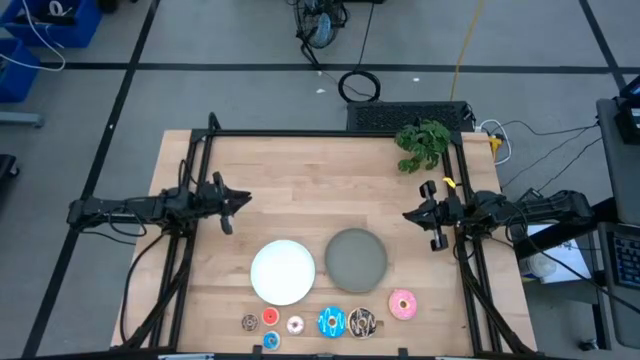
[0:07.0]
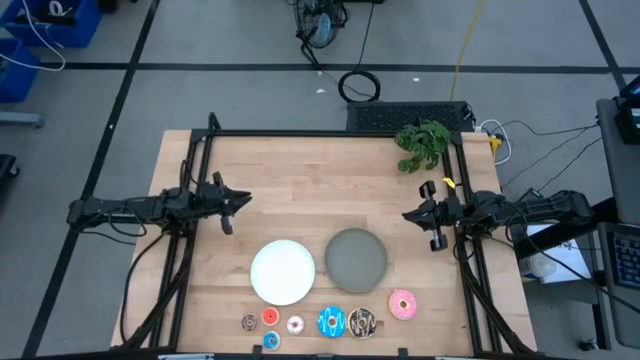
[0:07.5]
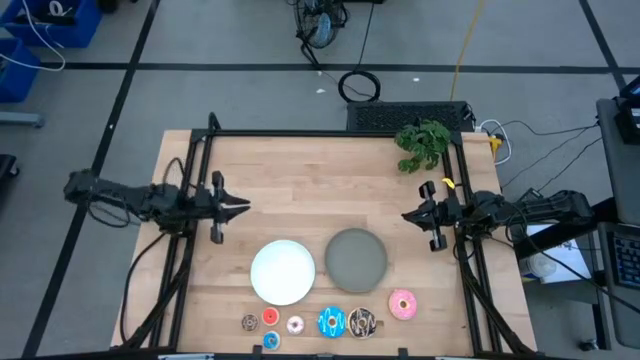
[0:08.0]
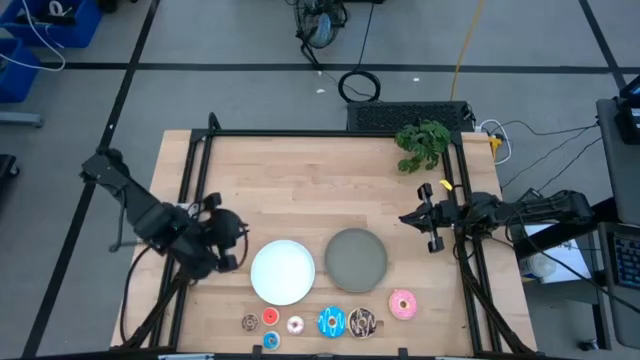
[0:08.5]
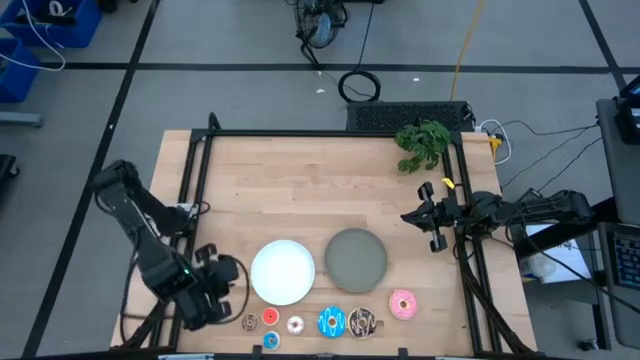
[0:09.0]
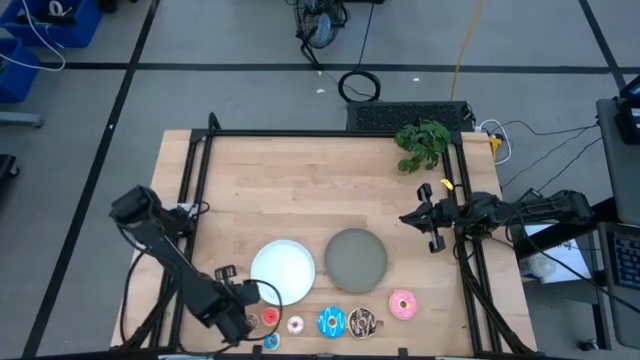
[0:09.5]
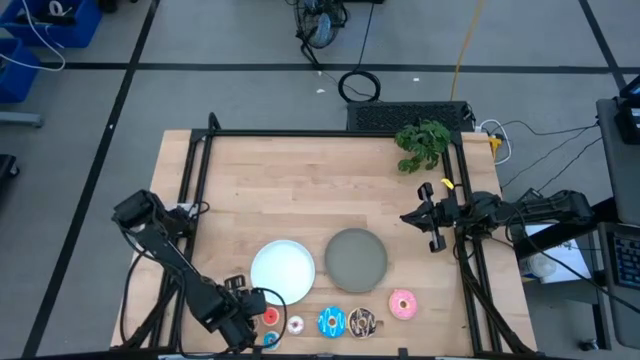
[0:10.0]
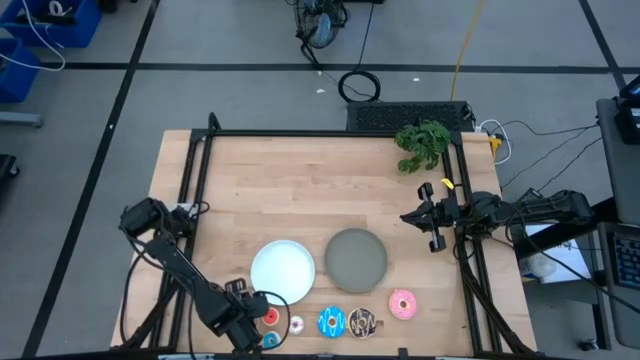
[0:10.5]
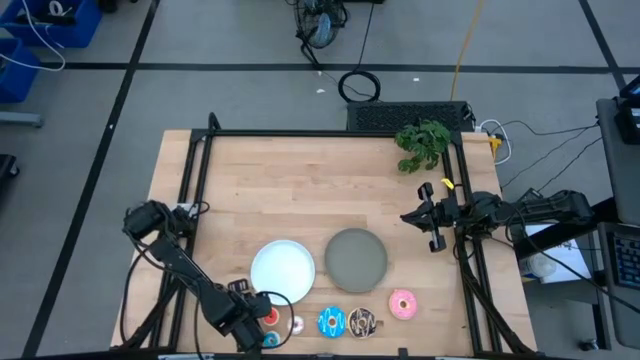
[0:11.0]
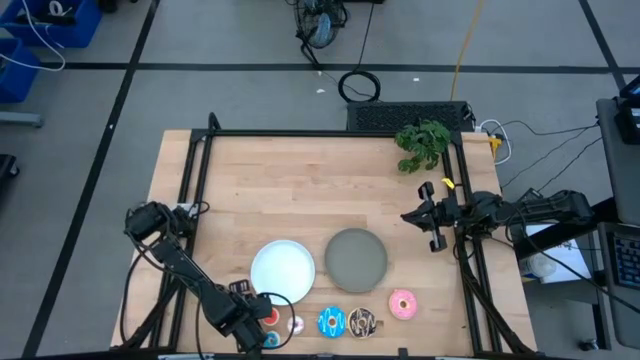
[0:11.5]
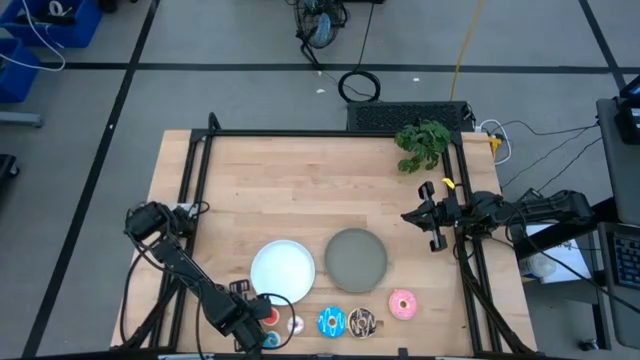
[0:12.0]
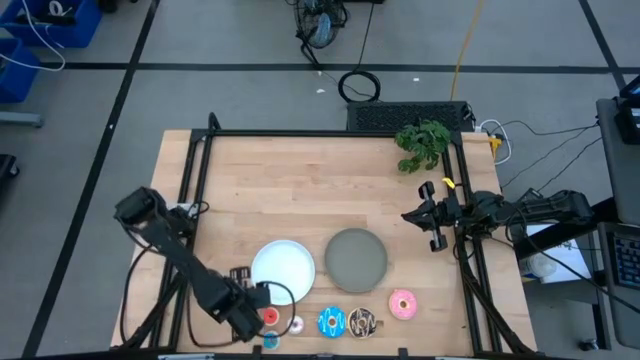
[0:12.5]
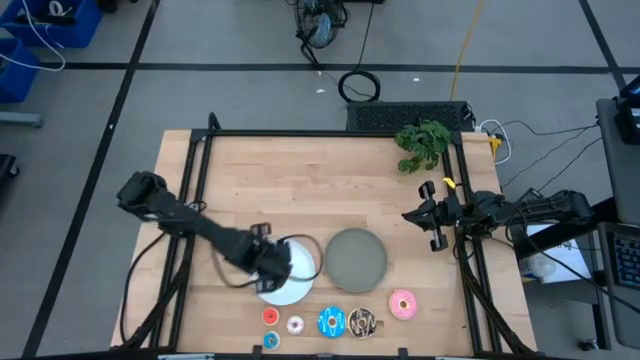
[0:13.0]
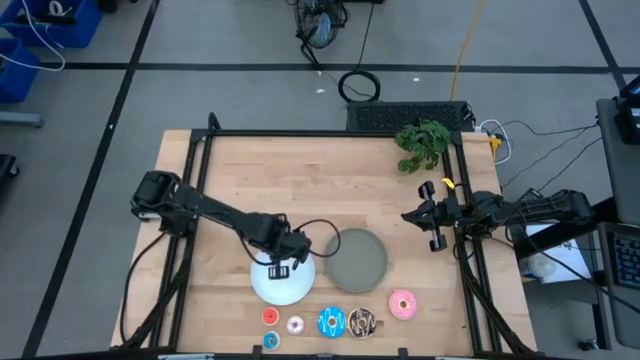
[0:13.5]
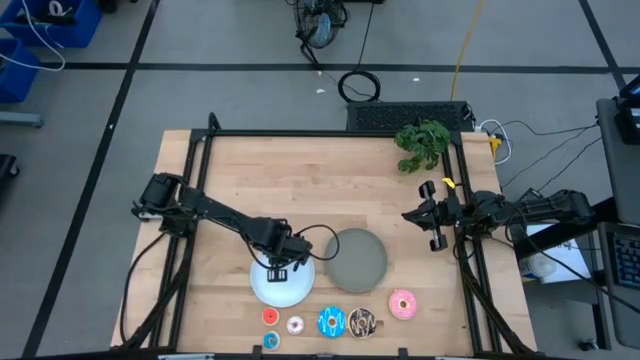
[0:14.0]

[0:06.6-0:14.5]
Task: Pick & Place donuts
Put the small brown donut on the white plate

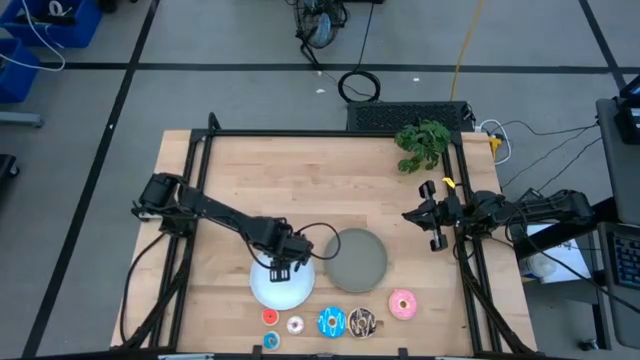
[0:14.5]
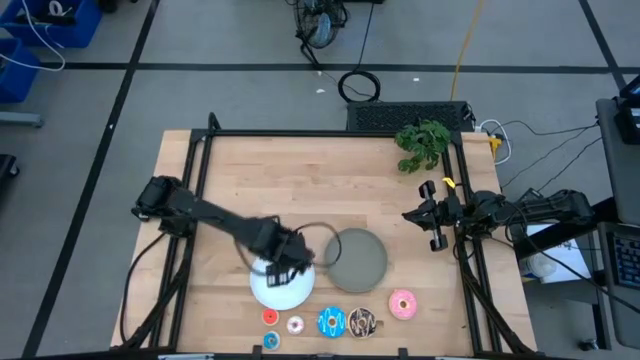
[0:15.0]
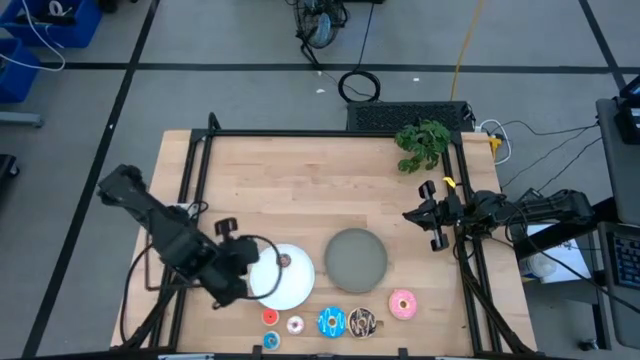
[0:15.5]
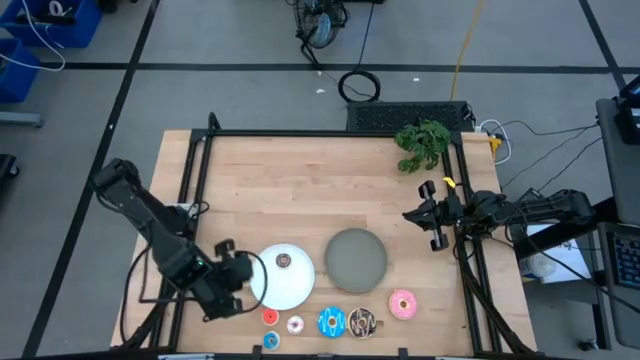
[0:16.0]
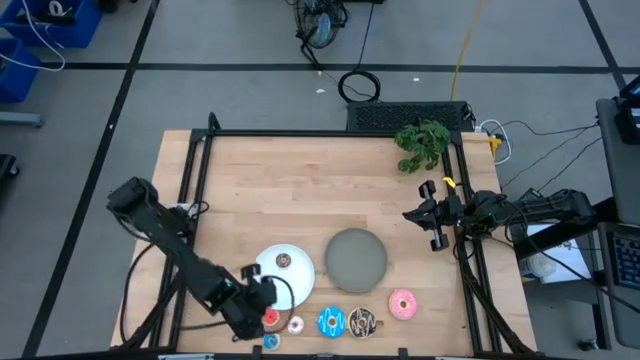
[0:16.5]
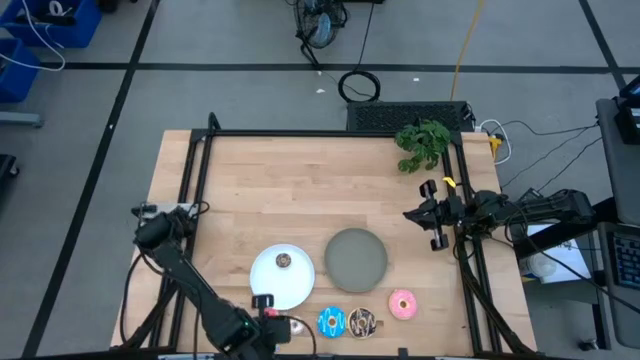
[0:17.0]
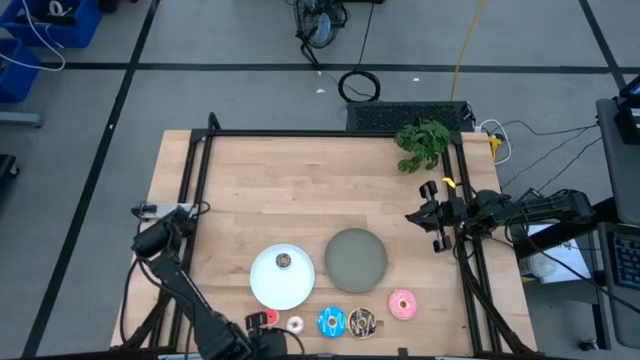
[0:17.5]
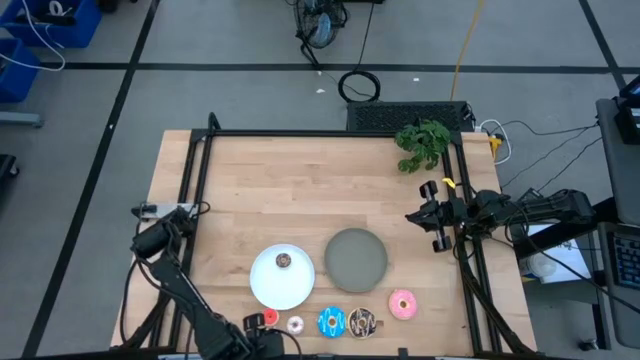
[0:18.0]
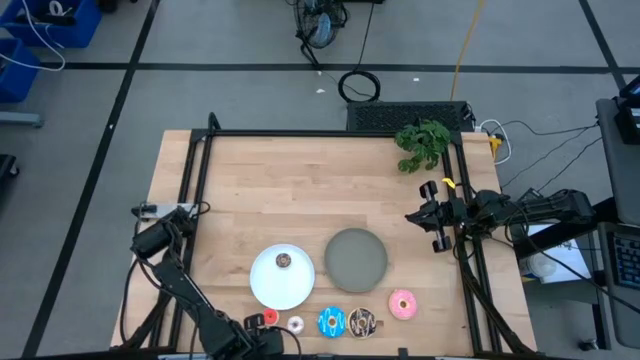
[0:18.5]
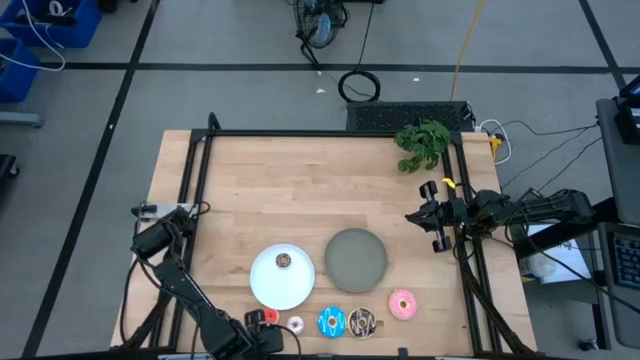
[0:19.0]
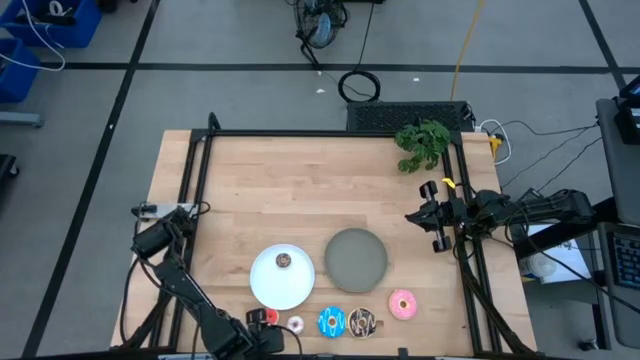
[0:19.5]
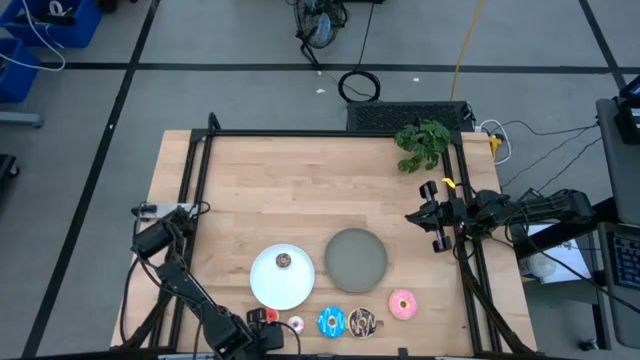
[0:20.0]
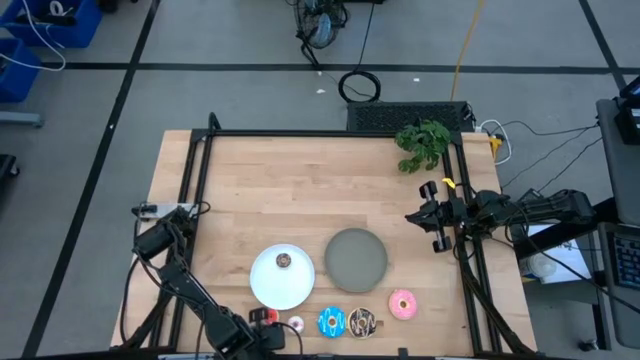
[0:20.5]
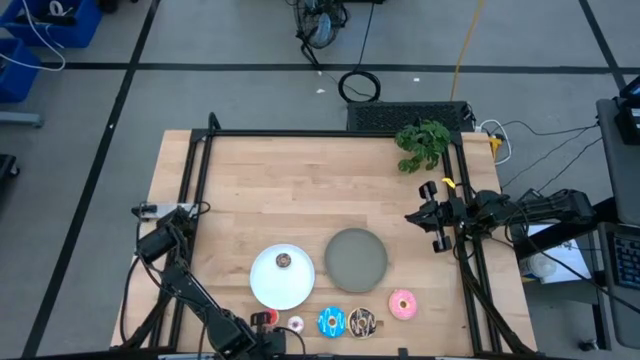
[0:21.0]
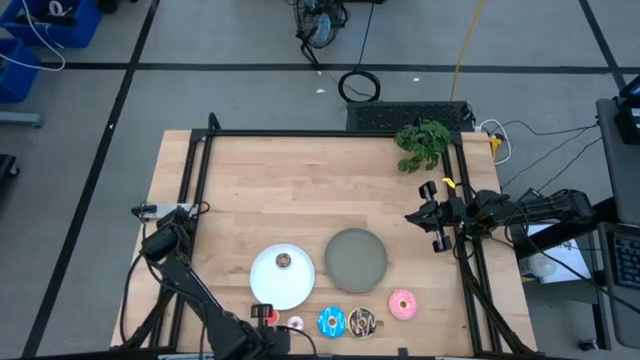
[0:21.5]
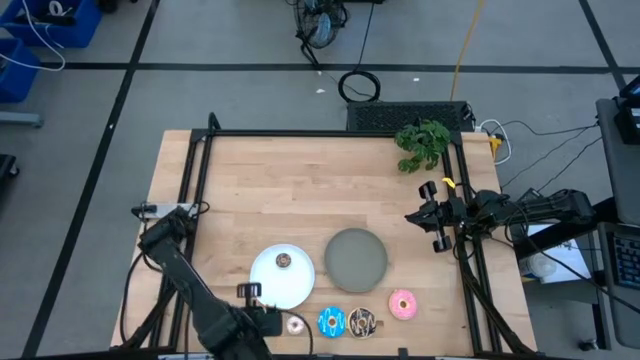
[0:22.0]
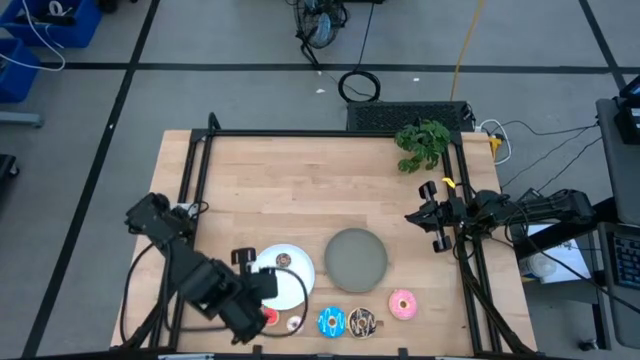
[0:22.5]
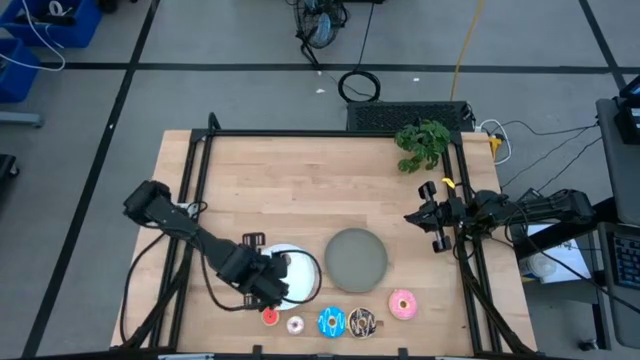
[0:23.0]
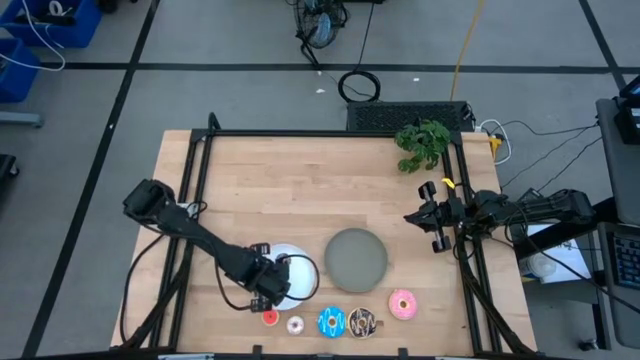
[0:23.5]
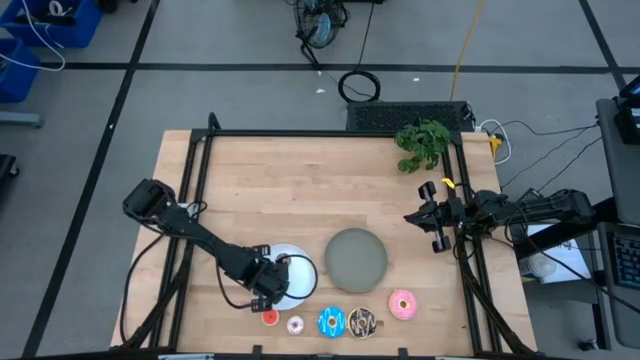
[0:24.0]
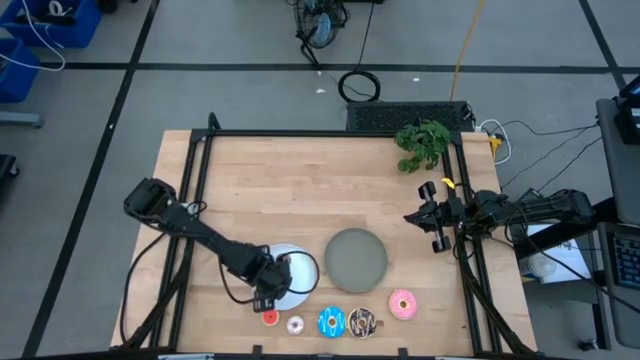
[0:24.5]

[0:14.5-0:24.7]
Put the small blue donut on the white plate
